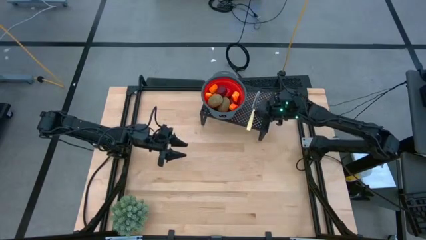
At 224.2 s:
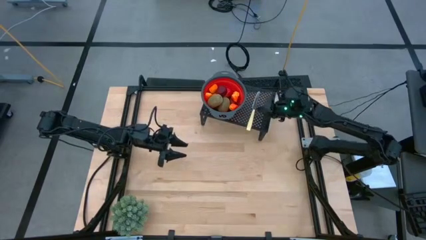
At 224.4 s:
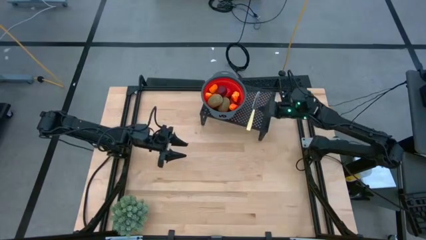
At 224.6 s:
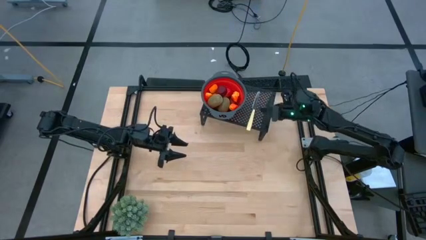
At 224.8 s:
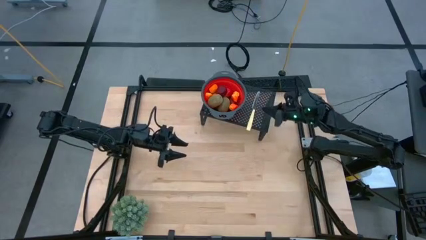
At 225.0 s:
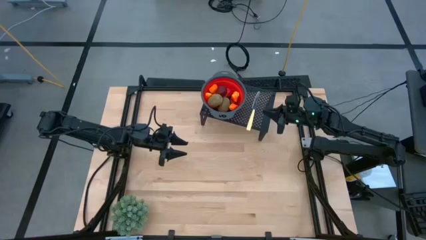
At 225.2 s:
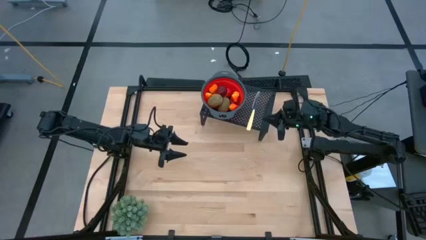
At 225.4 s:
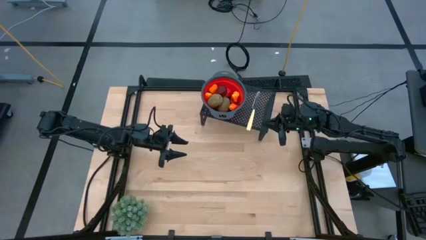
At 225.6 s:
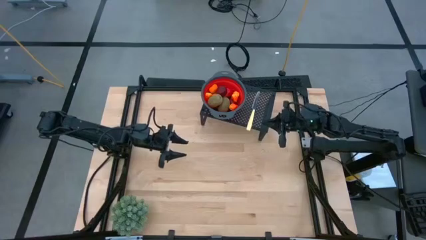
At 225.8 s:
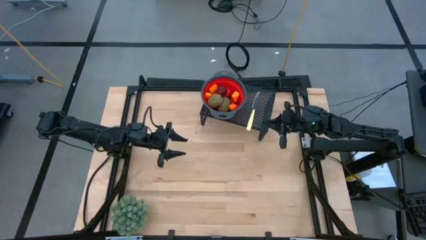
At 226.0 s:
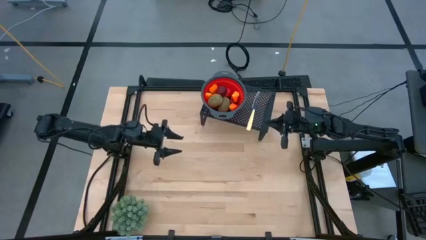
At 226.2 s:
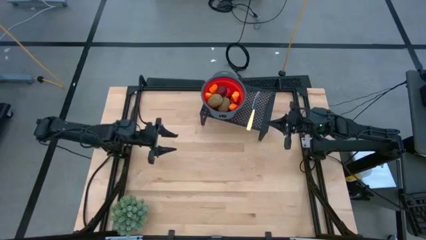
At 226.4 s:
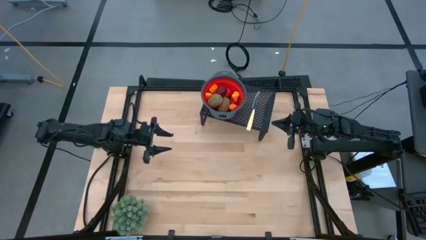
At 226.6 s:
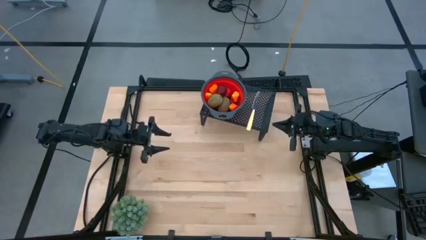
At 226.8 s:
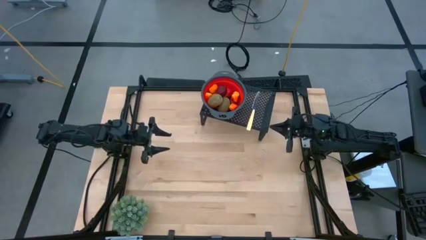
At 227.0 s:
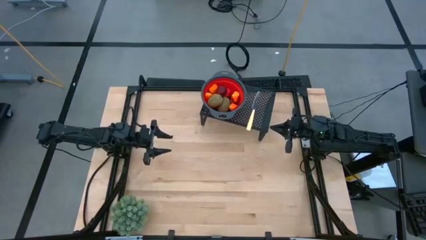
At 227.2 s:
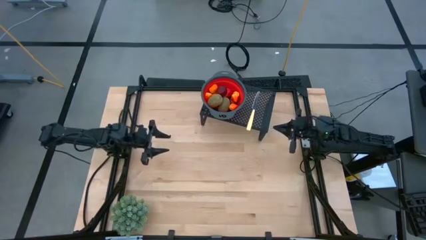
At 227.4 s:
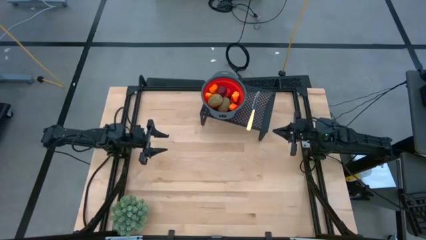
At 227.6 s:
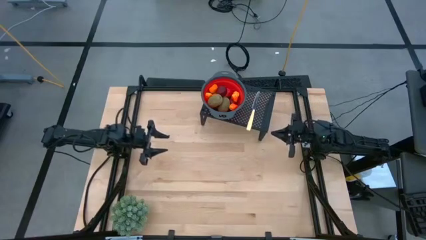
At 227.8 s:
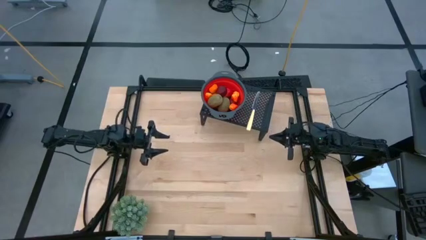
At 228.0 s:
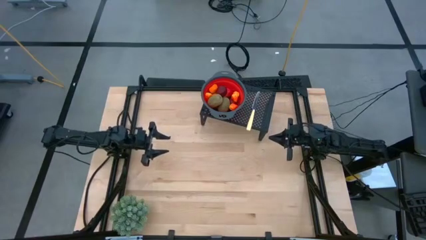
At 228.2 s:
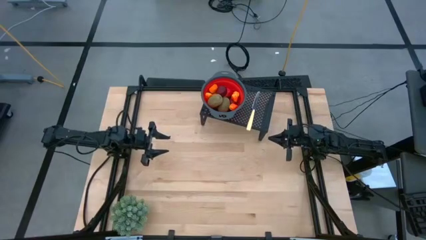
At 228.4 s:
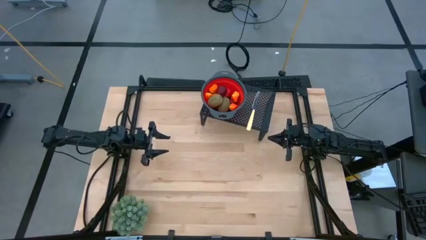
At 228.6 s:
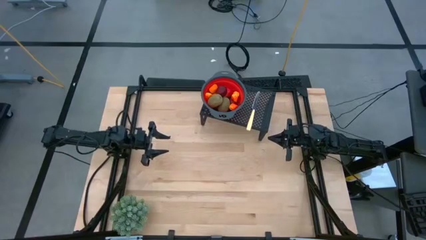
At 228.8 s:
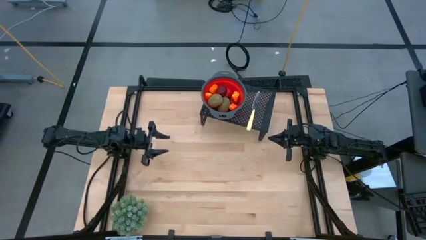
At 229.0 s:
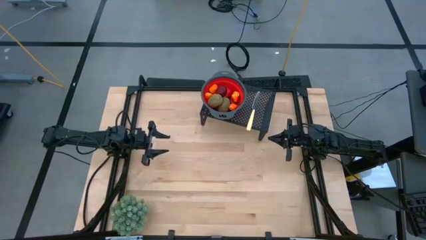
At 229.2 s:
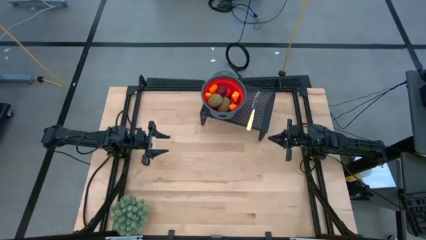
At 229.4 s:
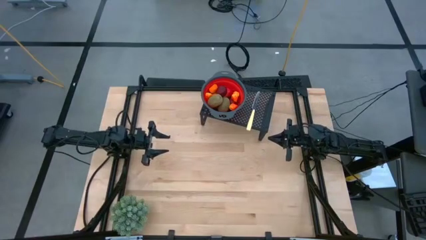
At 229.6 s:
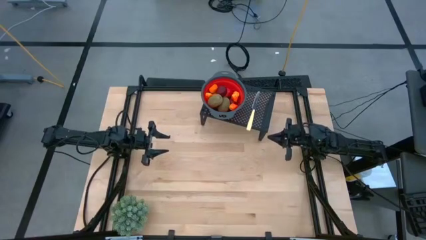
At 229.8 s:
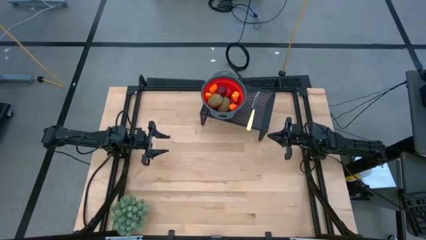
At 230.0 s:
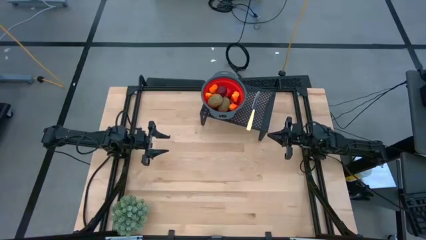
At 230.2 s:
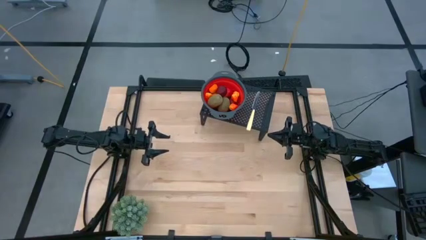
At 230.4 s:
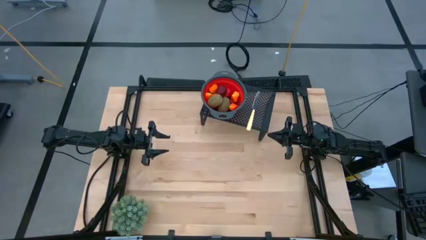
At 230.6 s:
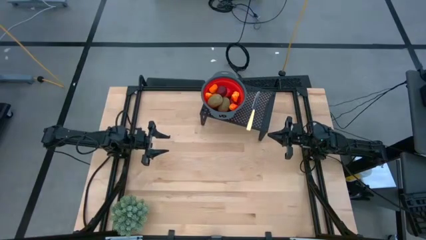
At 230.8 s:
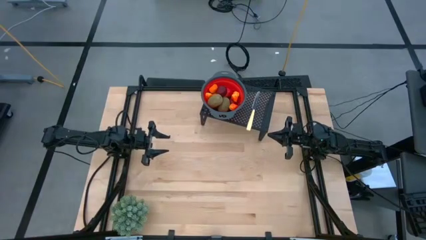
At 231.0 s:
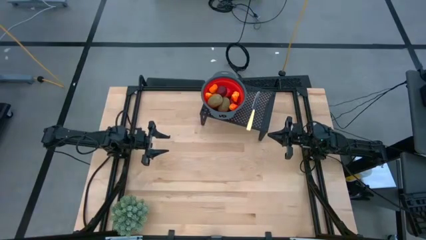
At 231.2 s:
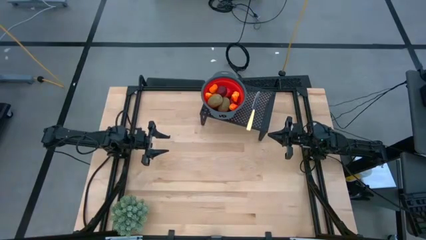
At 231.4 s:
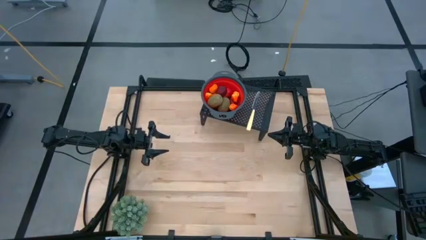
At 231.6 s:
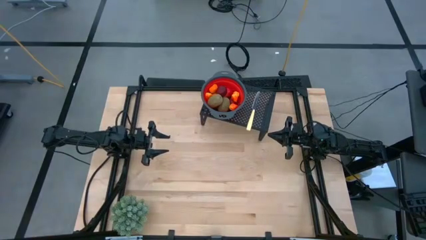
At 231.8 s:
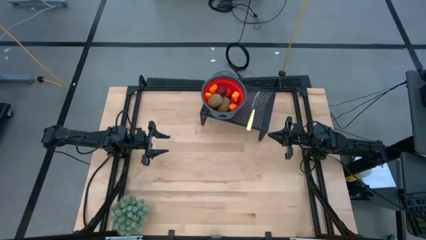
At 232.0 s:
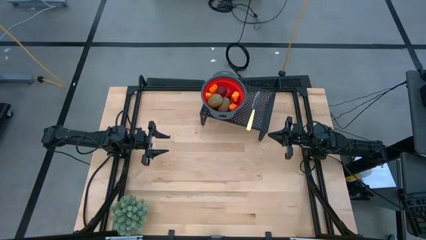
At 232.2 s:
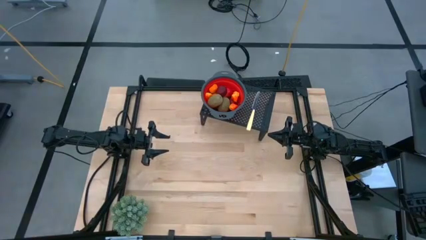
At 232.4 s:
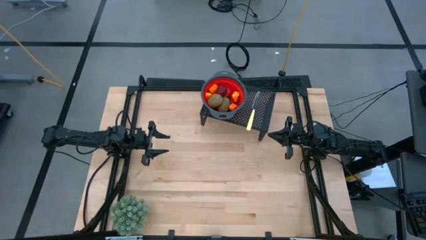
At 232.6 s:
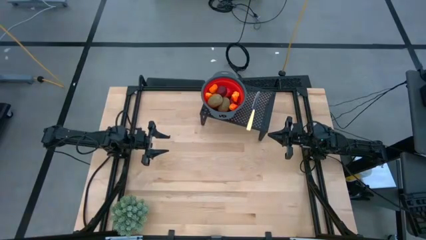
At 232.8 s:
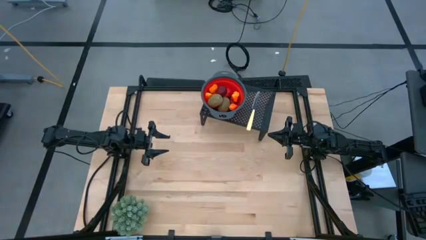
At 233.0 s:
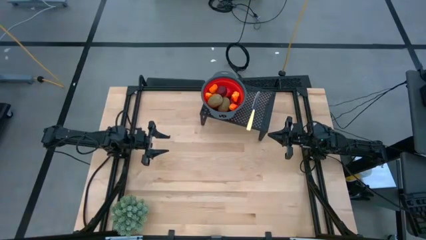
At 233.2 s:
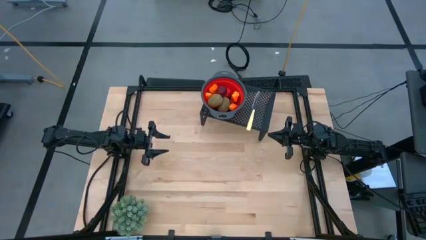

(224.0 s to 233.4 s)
Task: Pick & Place Fruit
Return to Home Position
